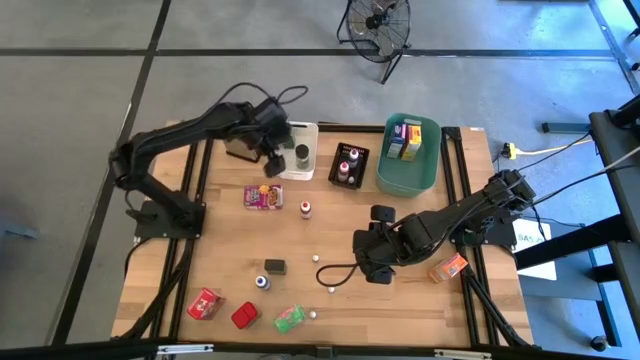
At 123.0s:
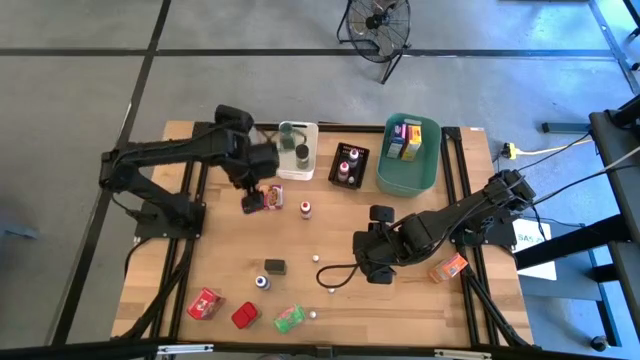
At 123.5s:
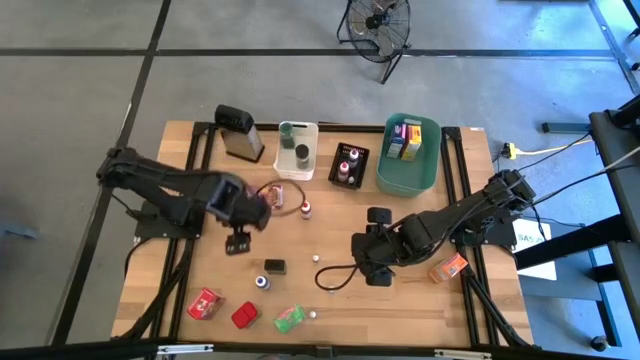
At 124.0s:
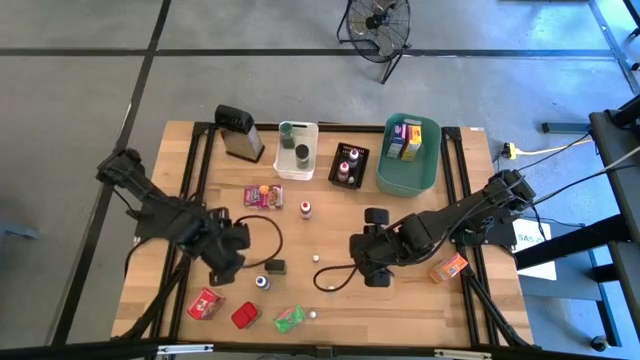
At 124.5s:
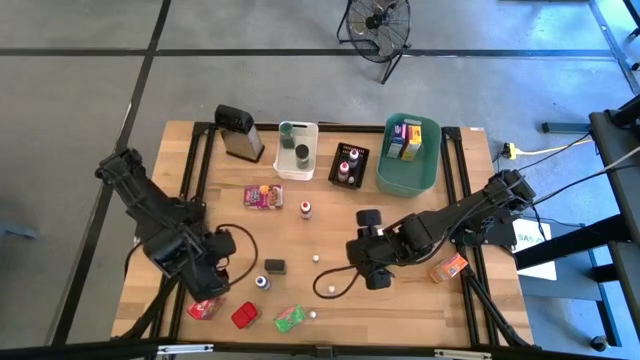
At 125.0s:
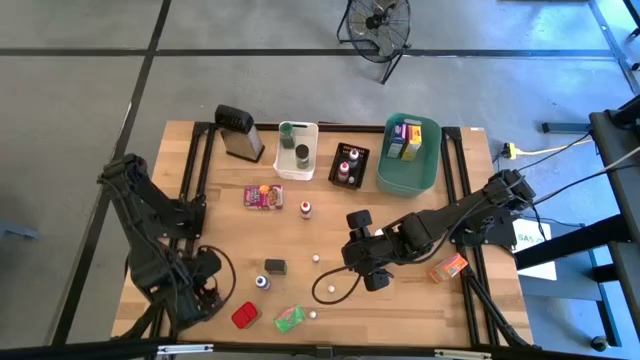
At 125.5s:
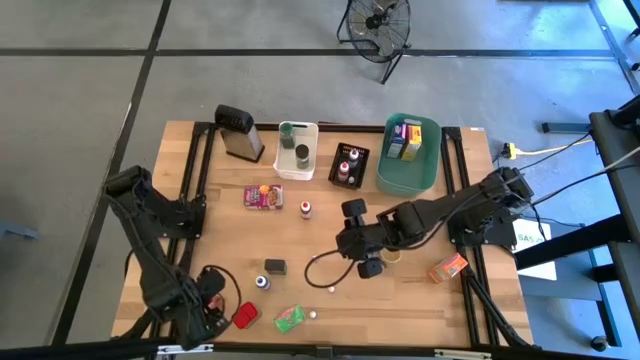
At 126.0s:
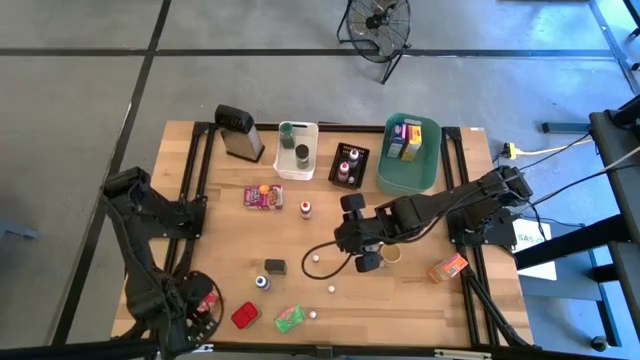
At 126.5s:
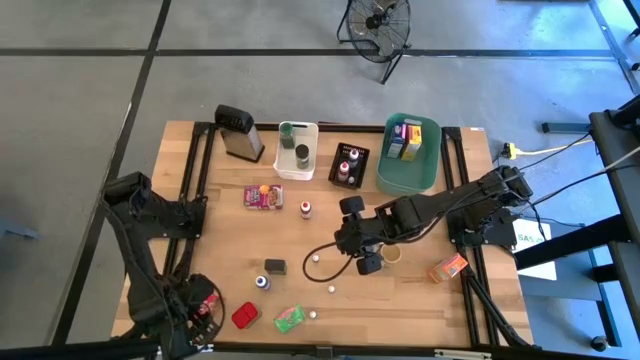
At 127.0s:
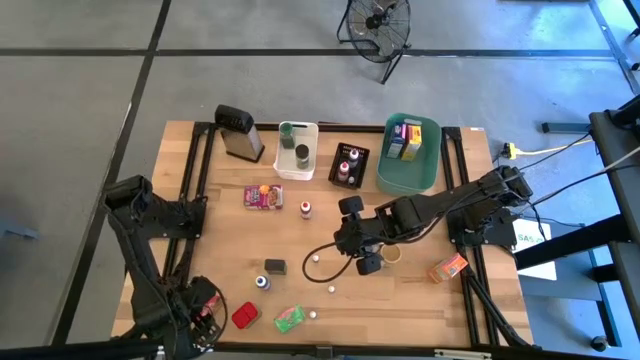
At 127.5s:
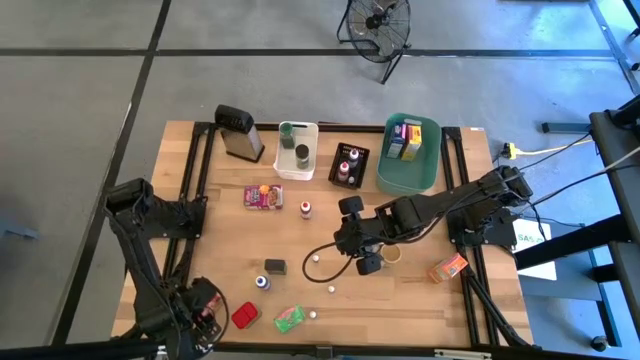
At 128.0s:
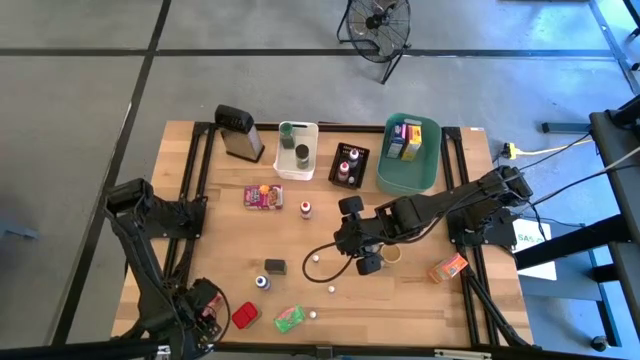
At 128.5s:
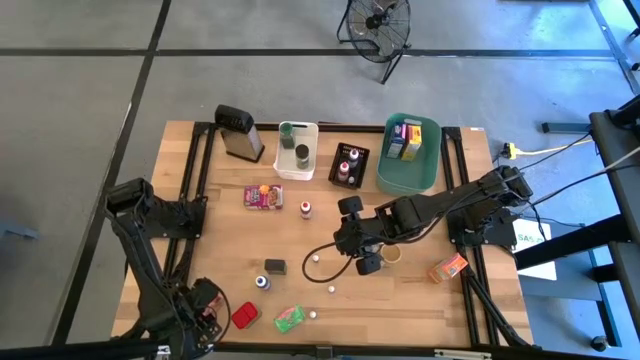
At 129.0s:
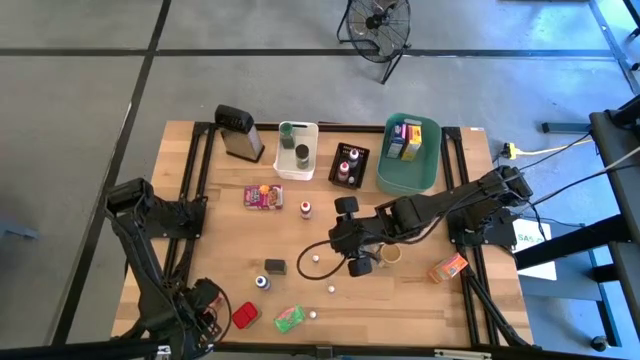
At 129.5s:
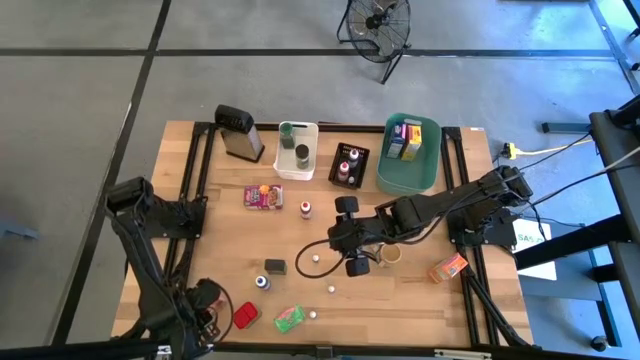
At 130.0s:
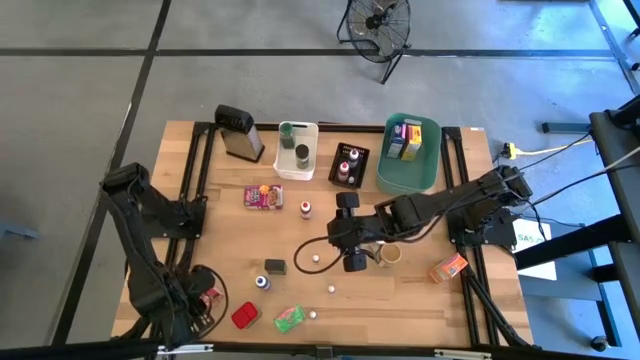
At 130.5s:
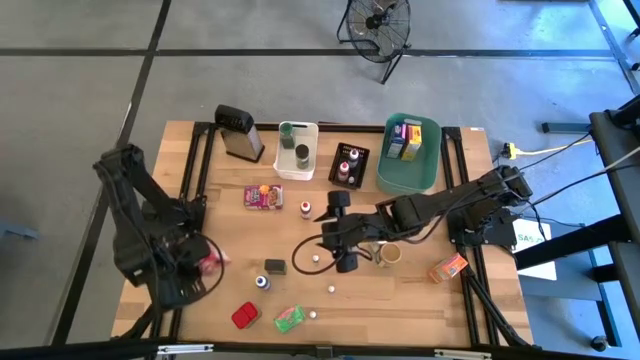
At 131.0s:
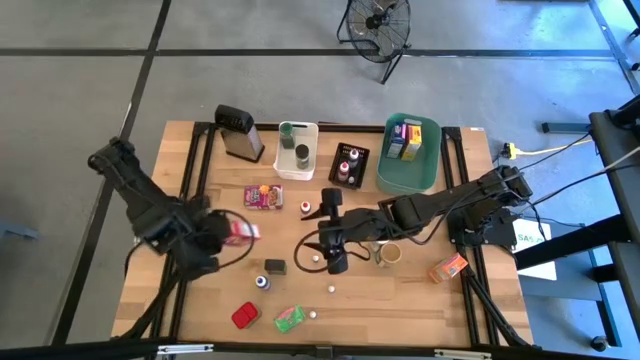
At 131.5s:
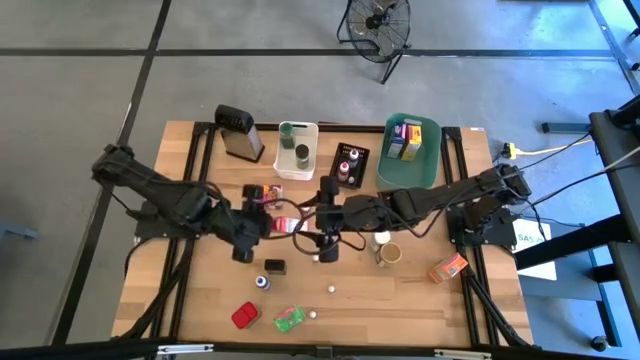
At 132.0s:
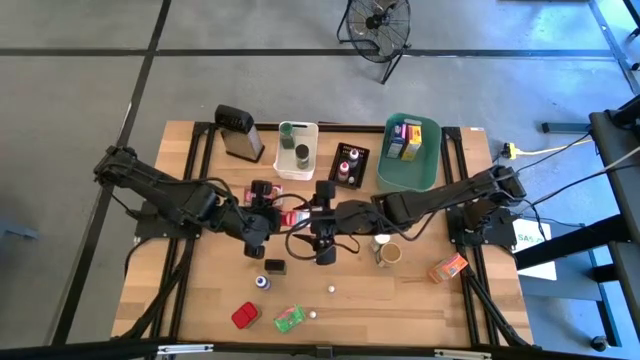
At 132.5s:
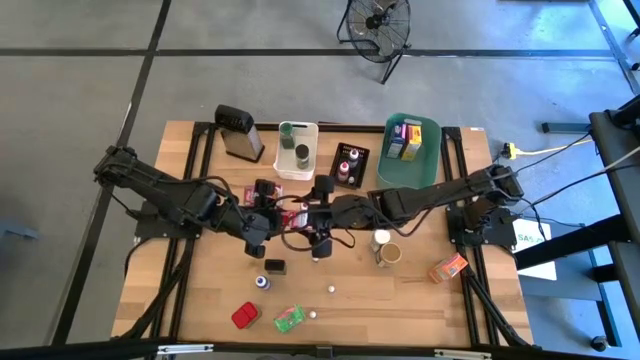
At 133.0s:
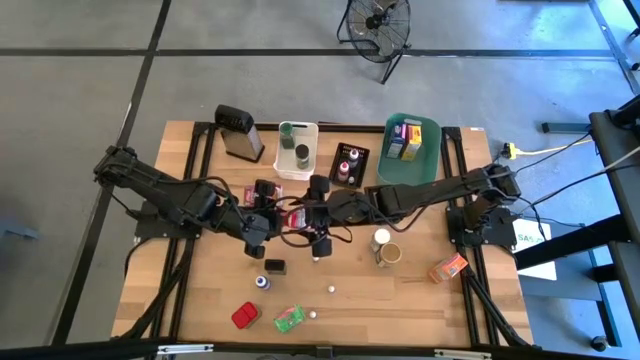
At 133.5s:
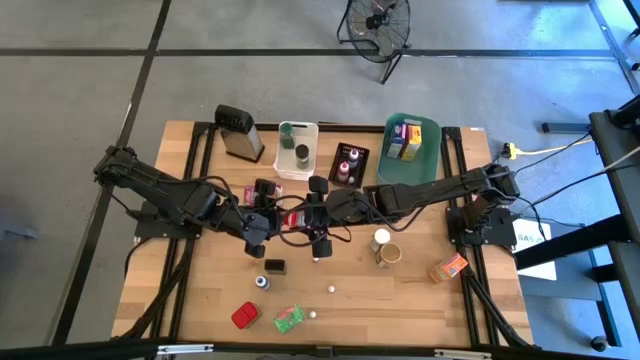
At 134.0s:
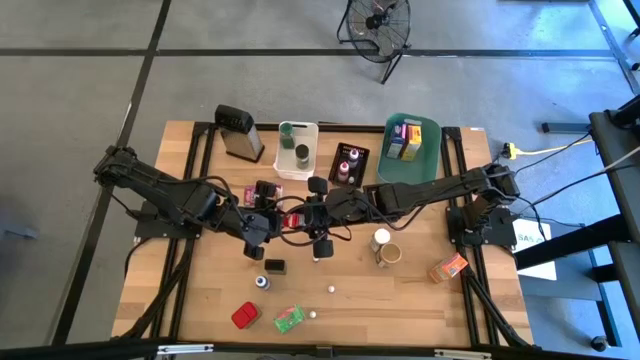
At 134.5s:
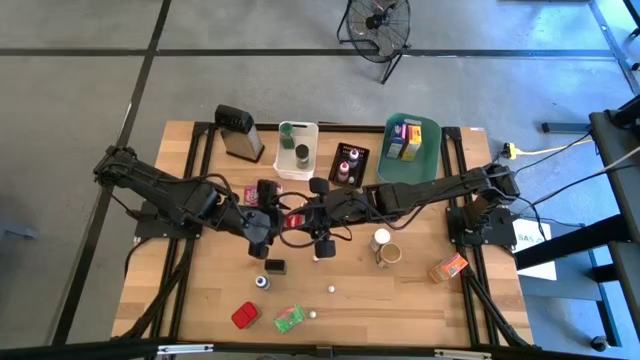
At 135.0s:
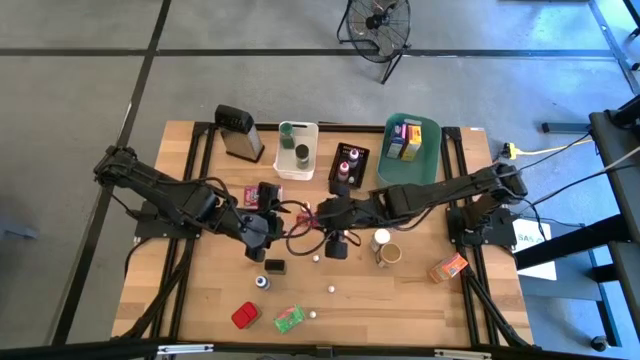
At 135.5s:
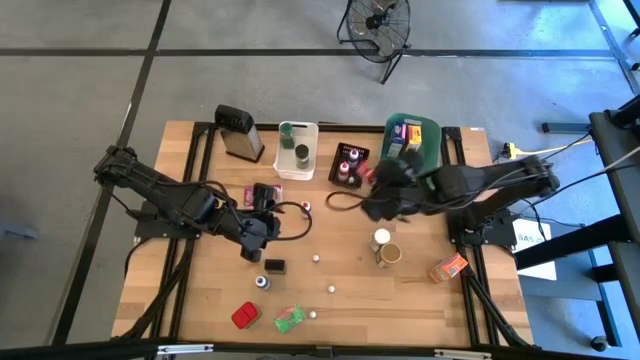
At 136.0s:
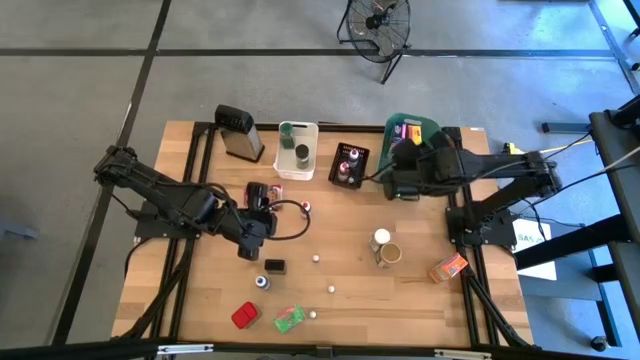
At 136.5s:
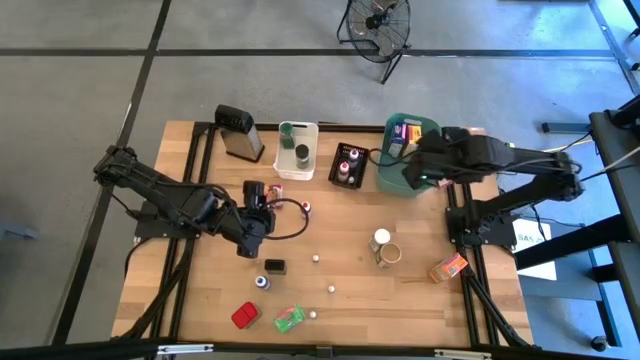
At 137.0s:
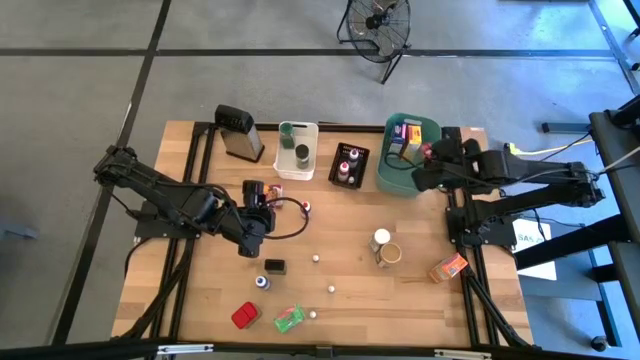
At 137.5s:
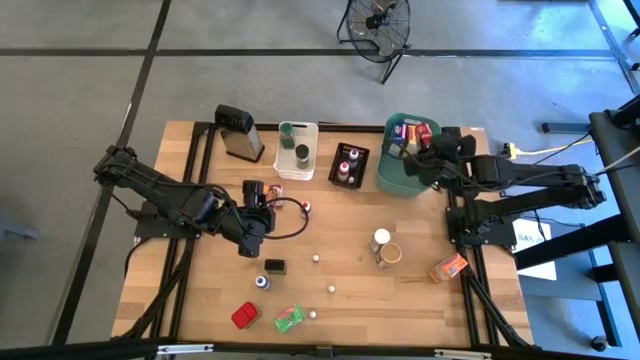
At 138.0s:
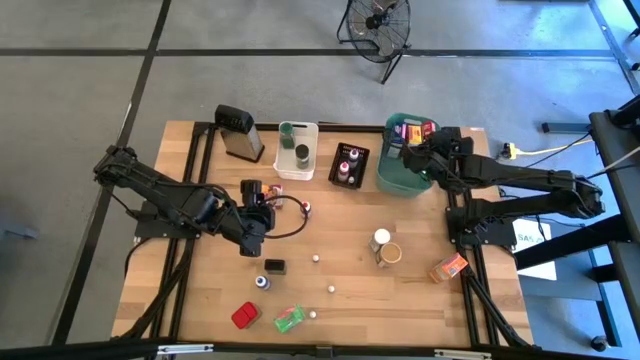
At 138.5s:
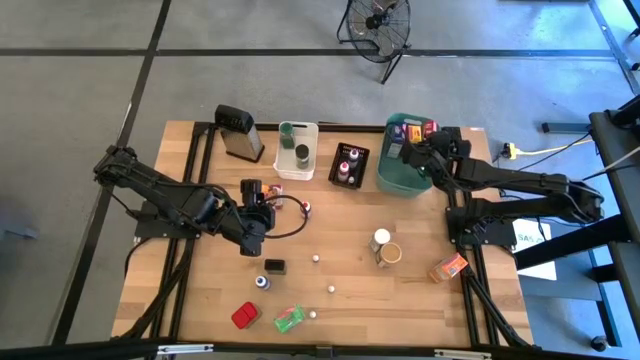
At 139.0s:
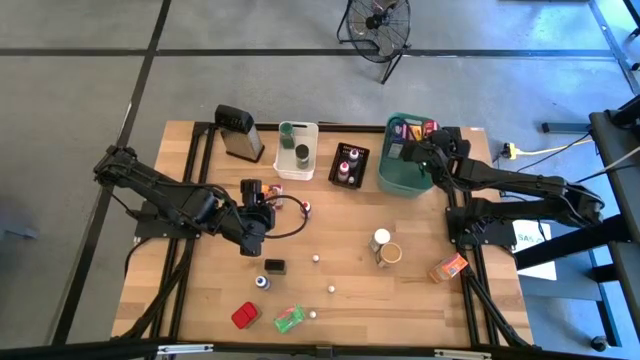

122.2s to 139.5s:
Task: Pick & Place Kitchen Items
Put the red cereal box into the green bin

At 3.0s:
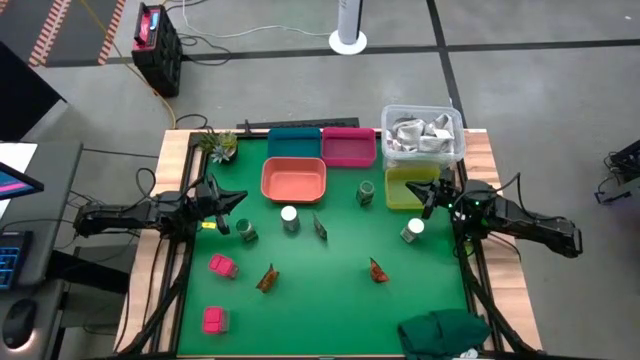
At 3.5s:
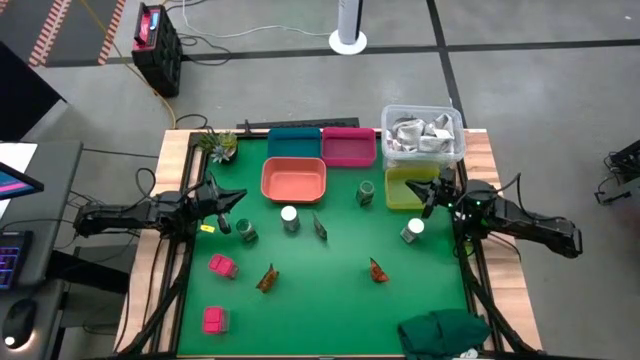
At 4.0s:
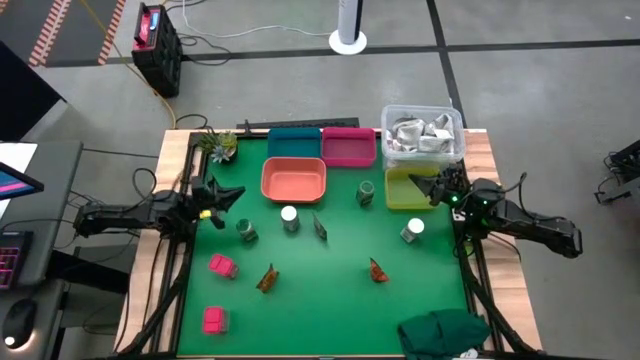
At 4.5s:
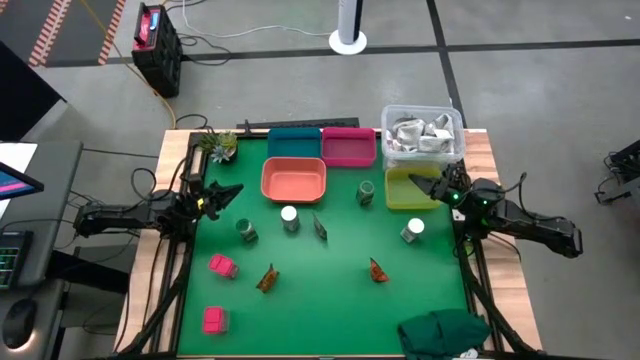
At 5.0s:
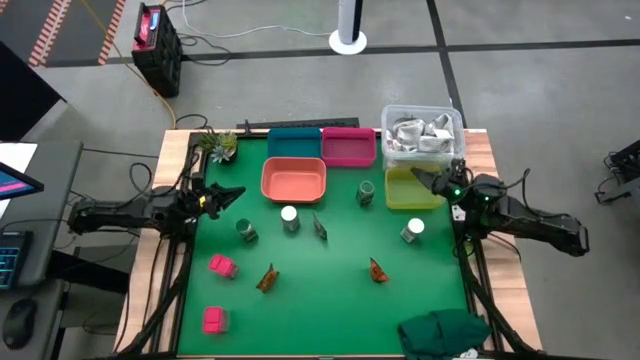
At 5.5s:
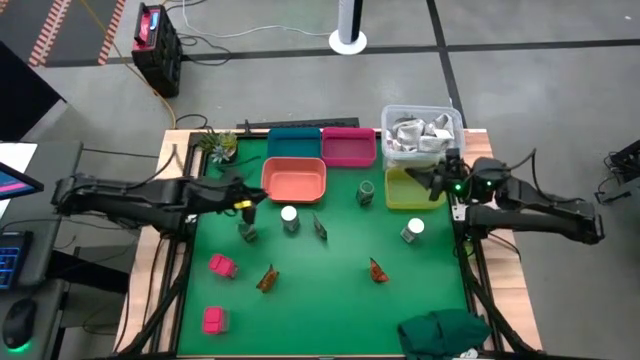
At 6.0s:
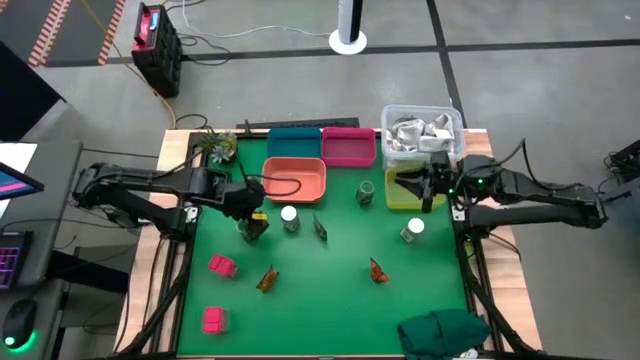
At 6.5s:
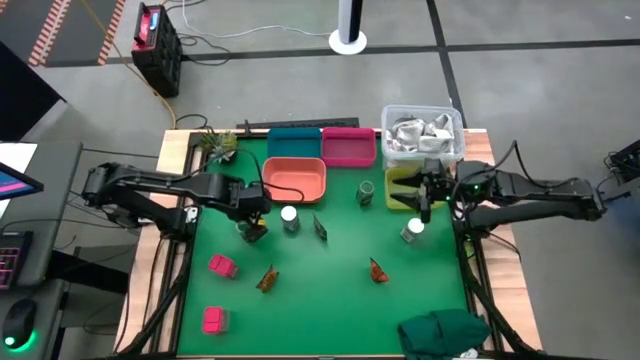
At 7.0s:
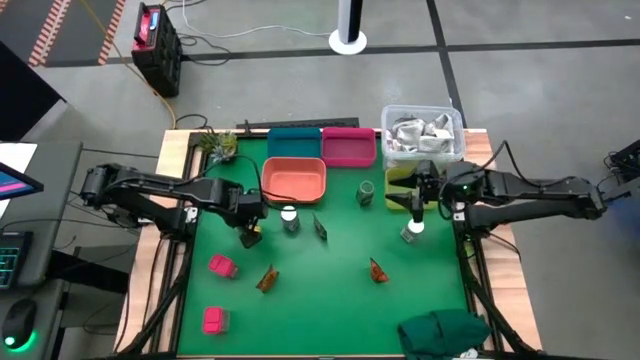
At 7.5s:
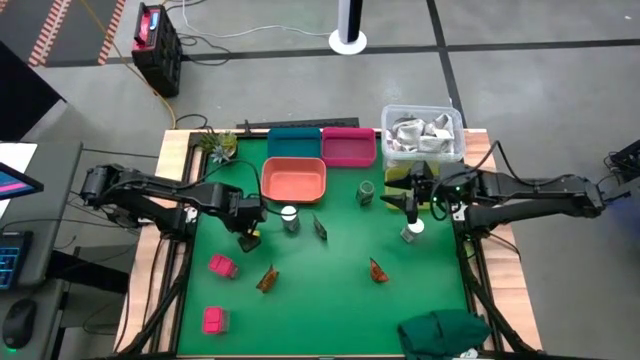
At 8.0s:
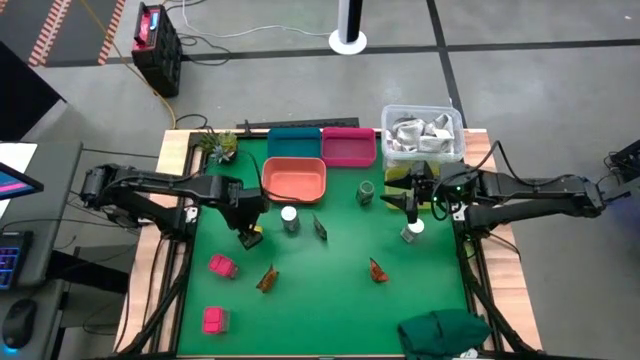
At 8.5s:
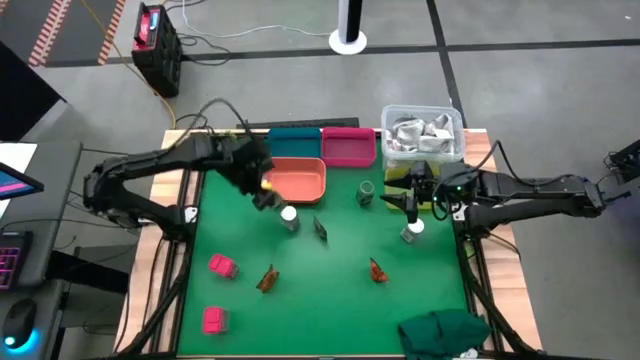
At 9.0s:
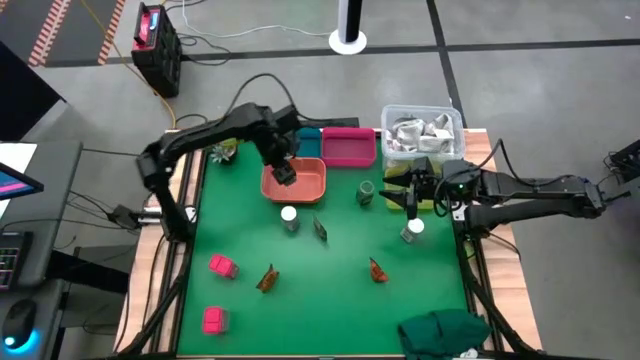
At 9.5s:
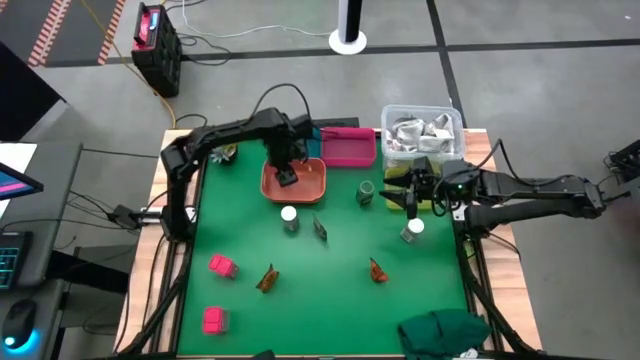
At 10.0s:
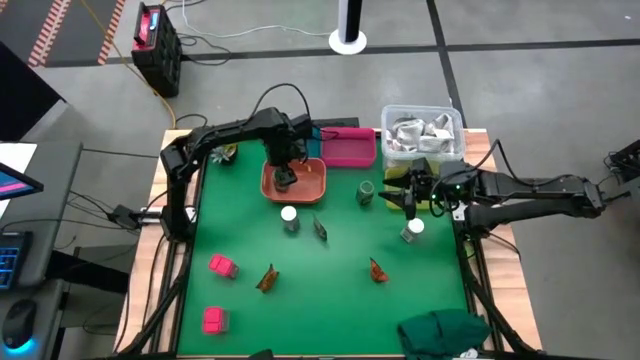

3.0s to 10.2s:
Task: Sort spices by type
Put the left green seasoning bottle into the orange bin
